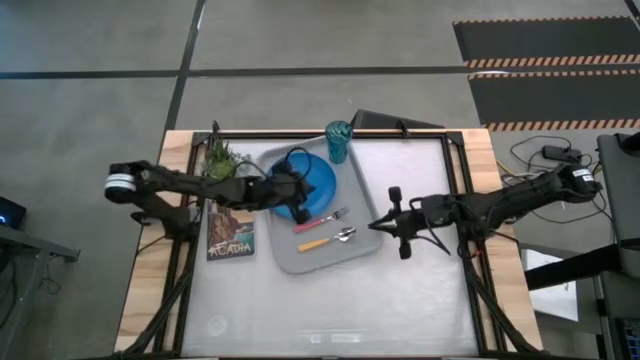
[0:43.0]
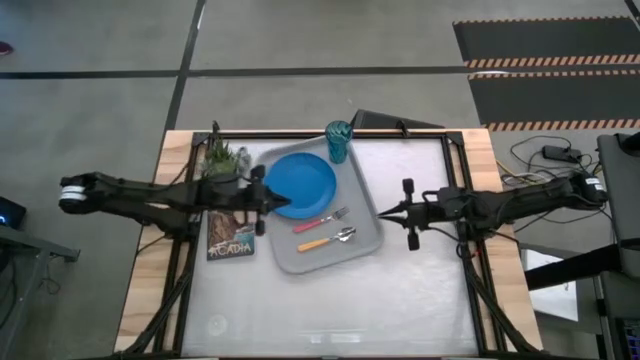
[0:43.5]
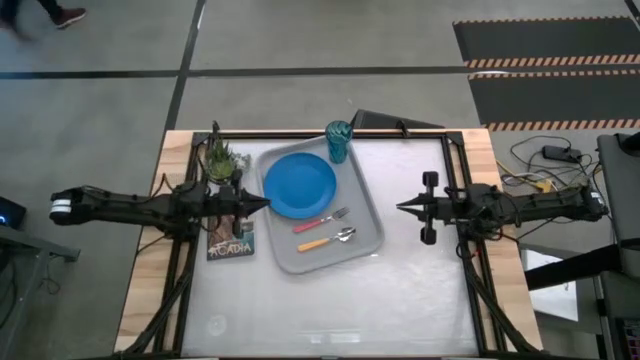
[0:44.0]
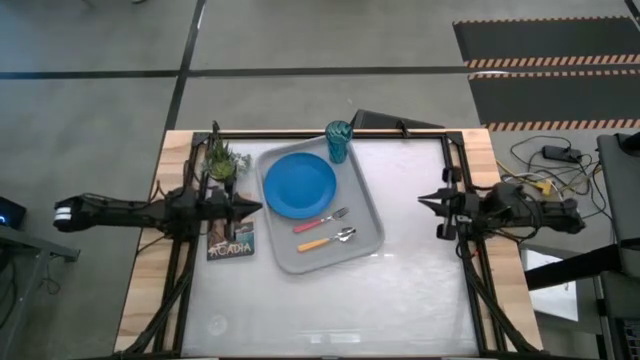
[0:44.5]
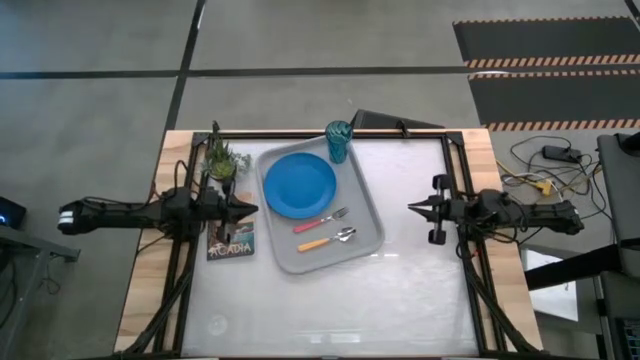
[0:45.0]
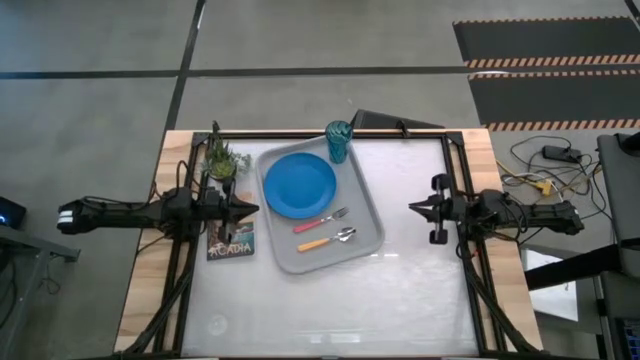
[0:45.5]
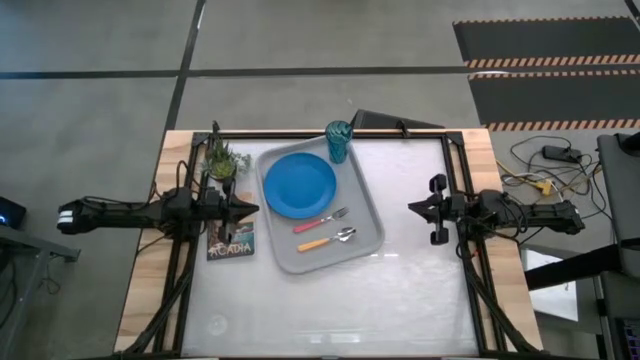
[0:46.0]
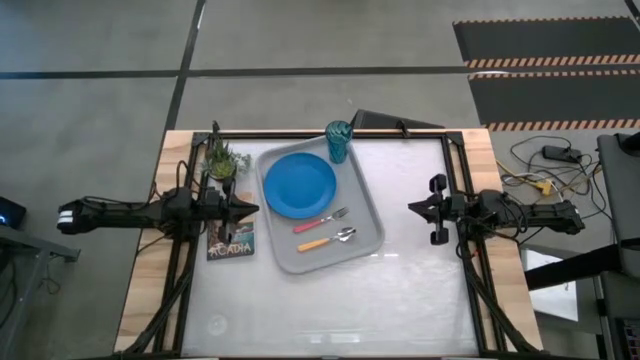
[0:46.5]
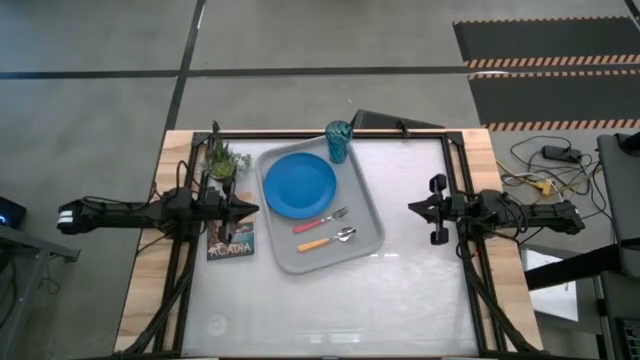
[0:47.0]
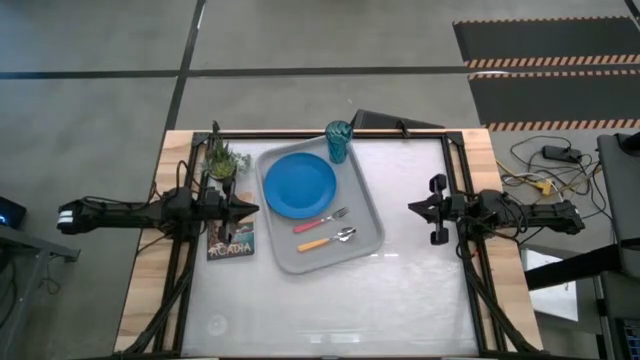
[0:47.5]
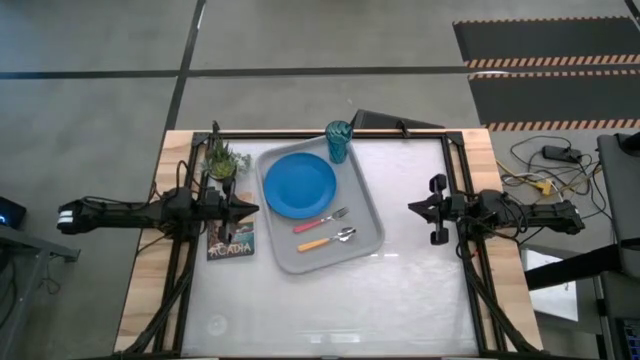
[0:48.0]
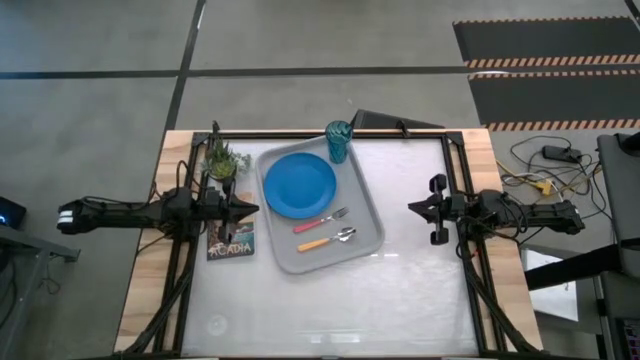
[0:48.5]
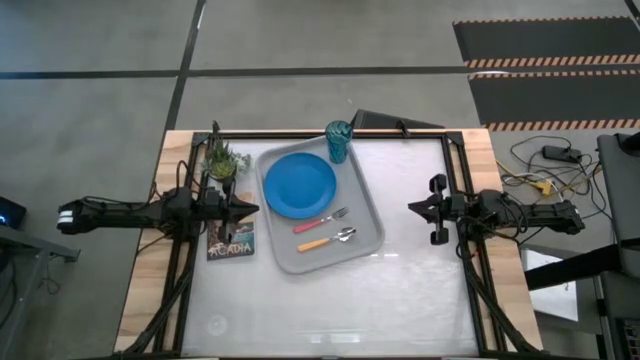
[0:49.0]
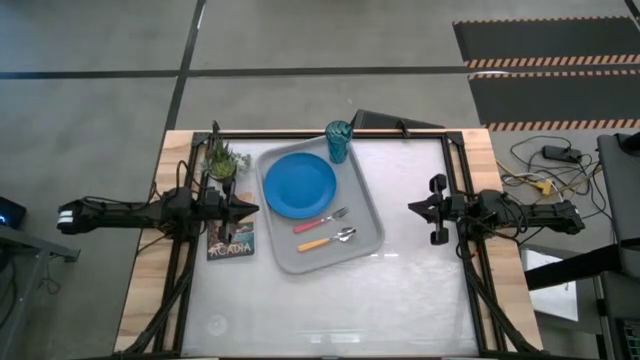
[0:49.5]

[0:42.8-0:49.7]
Task: Pick and place plate/cup/fork/spoon on tray
Return to Home Position

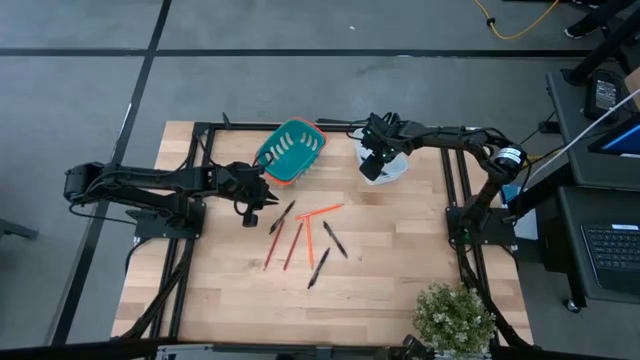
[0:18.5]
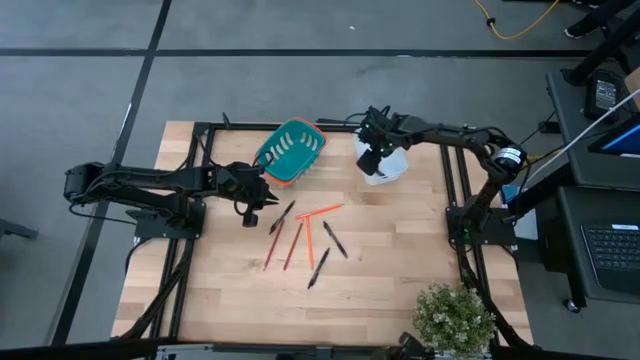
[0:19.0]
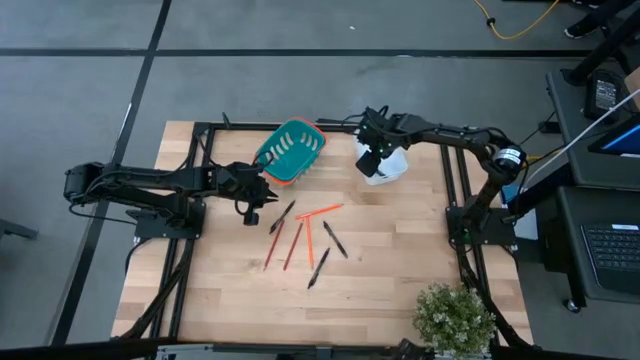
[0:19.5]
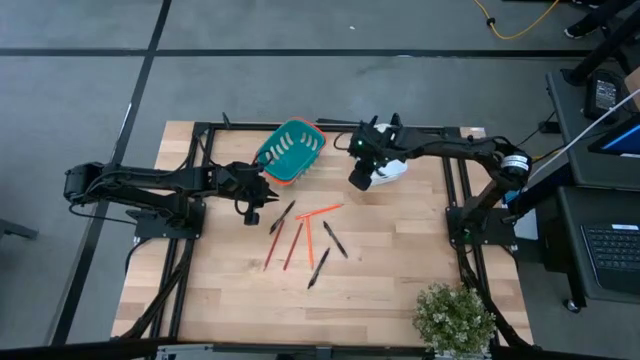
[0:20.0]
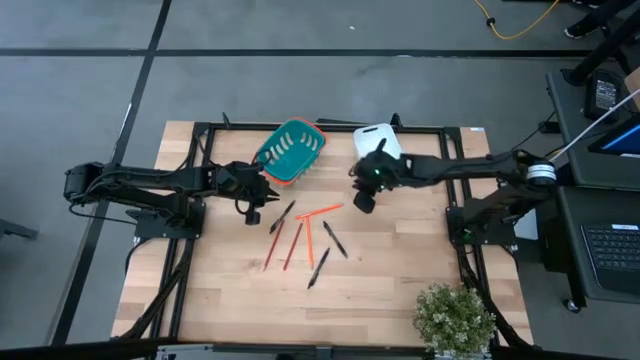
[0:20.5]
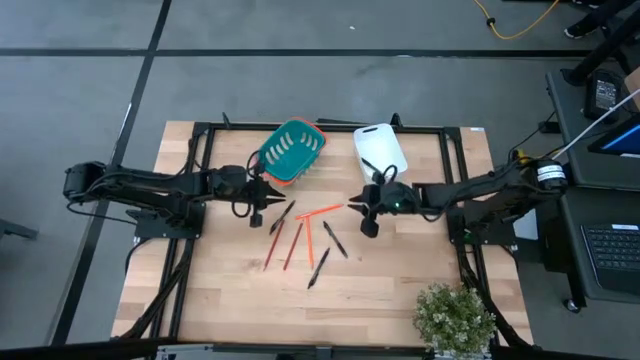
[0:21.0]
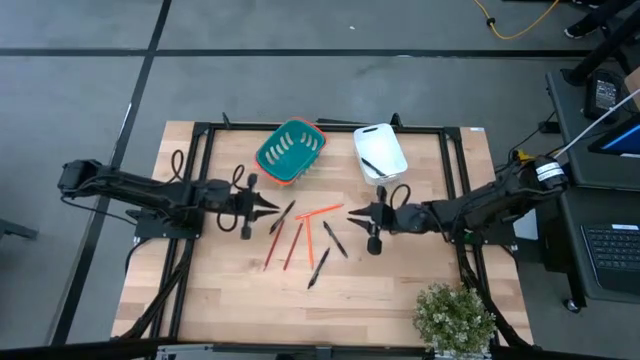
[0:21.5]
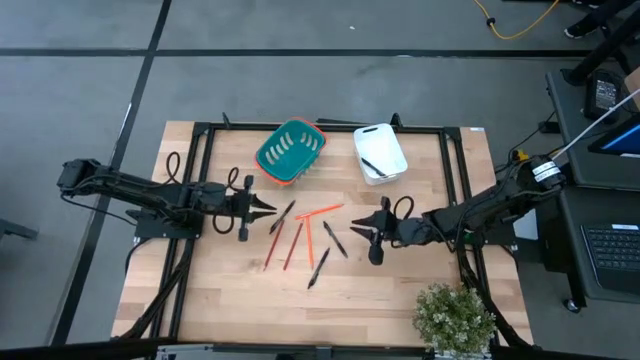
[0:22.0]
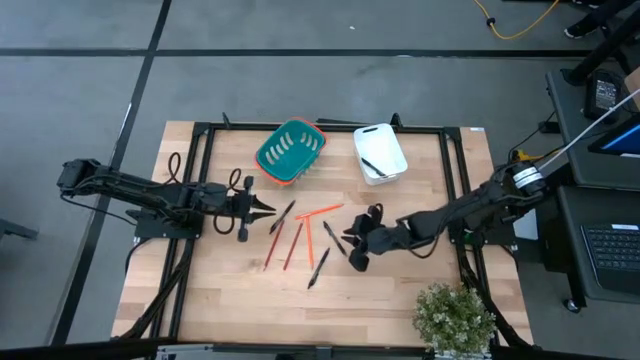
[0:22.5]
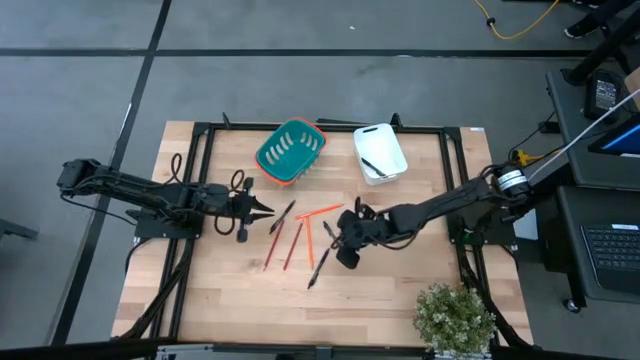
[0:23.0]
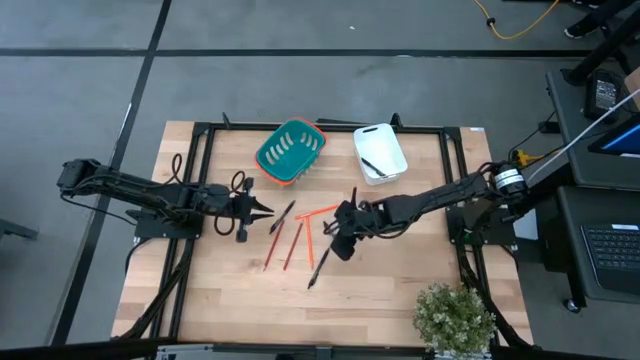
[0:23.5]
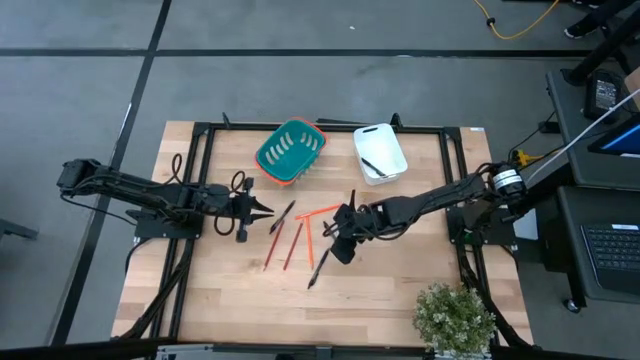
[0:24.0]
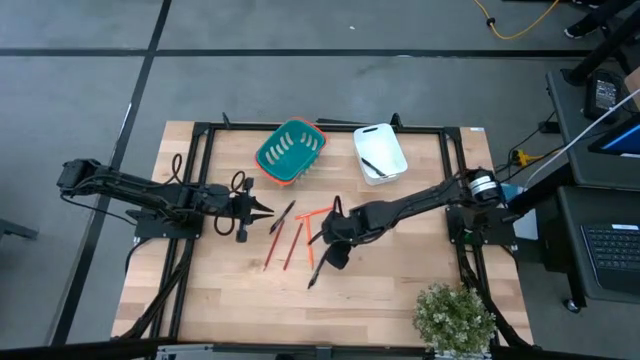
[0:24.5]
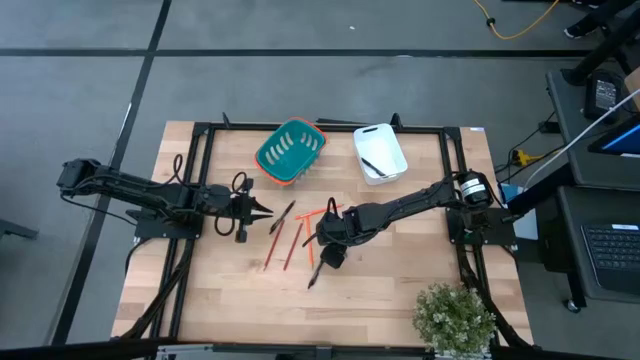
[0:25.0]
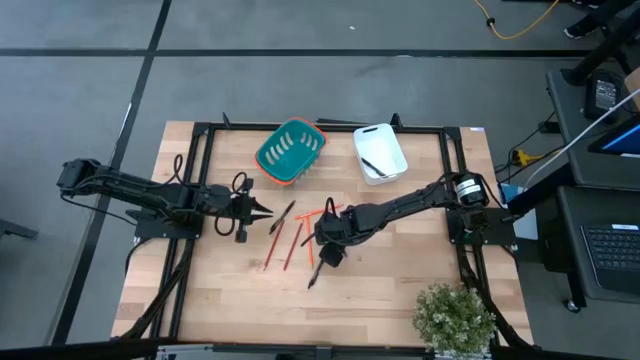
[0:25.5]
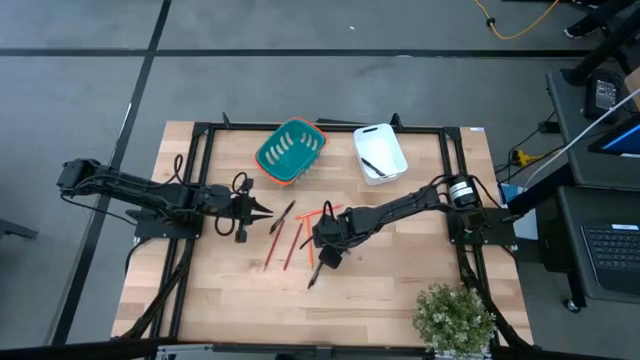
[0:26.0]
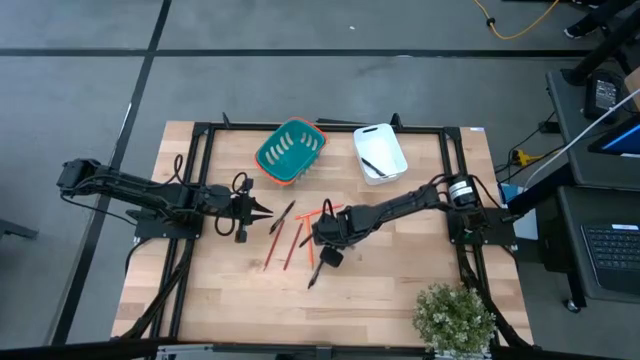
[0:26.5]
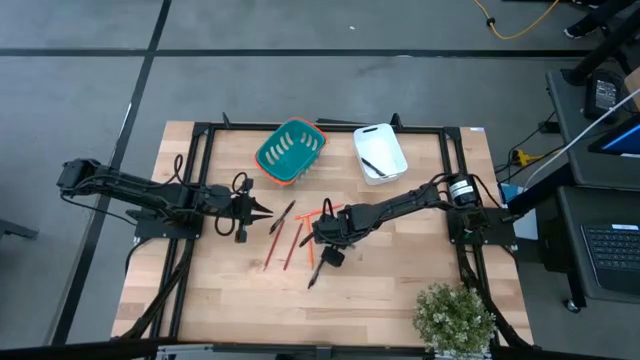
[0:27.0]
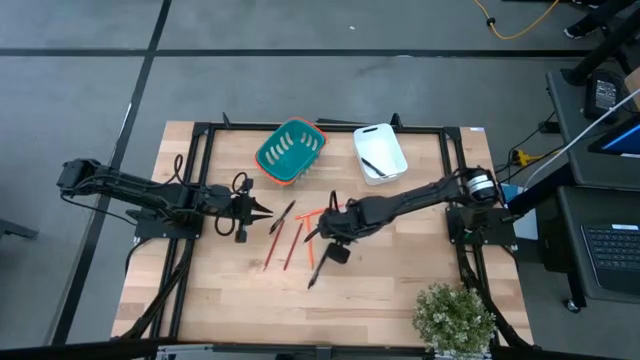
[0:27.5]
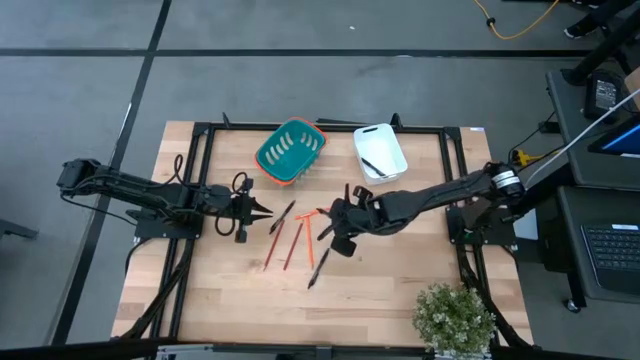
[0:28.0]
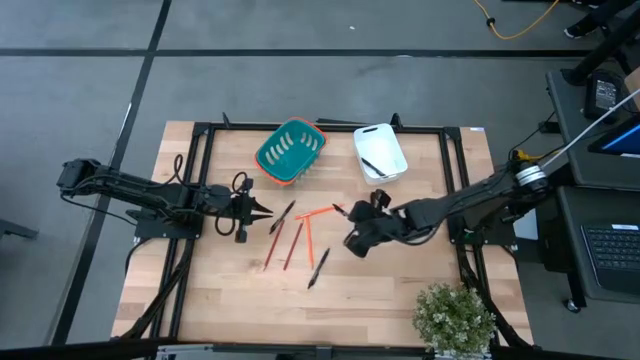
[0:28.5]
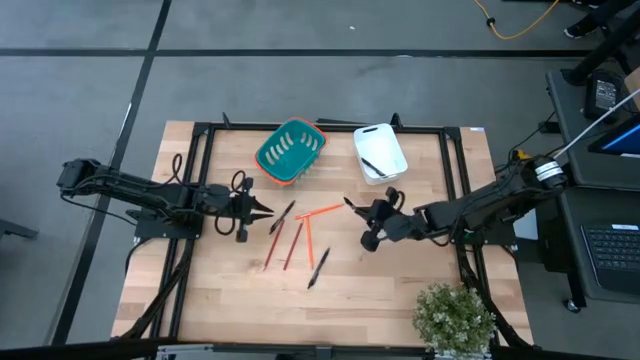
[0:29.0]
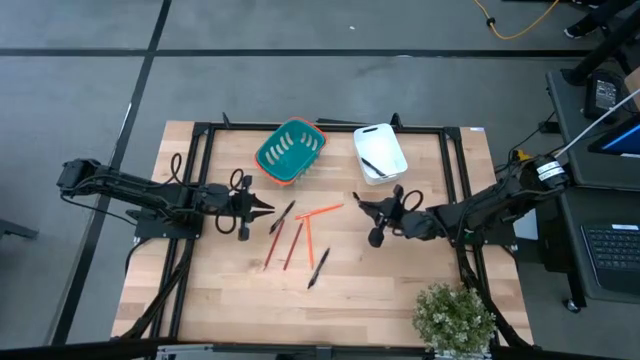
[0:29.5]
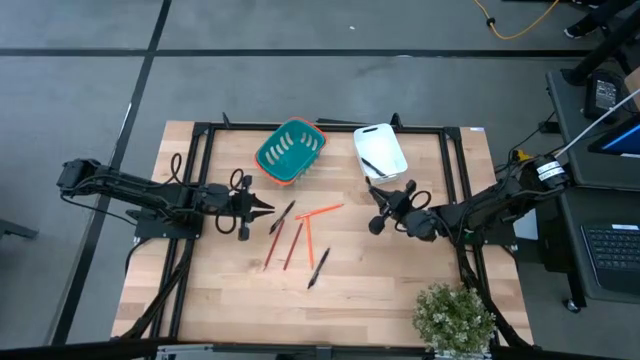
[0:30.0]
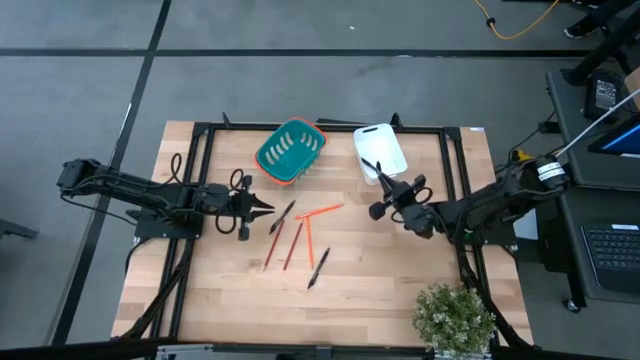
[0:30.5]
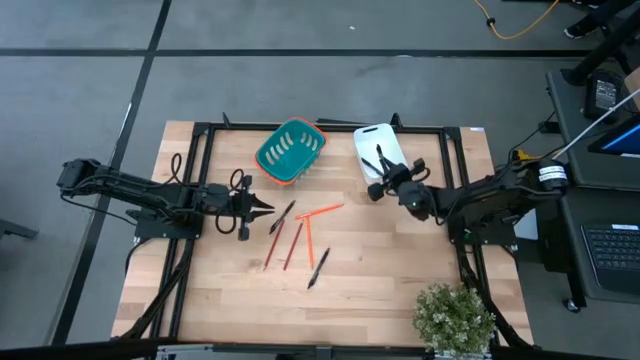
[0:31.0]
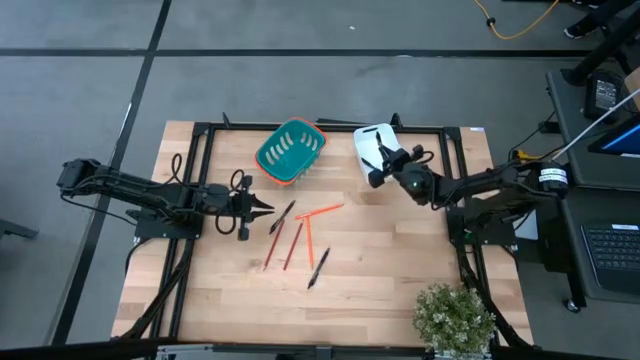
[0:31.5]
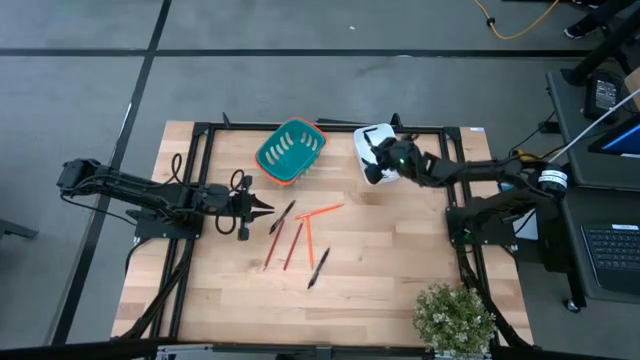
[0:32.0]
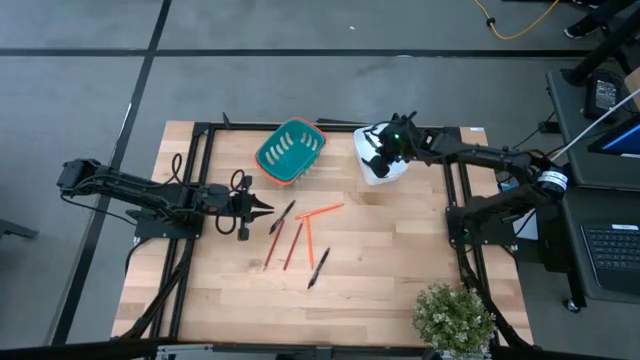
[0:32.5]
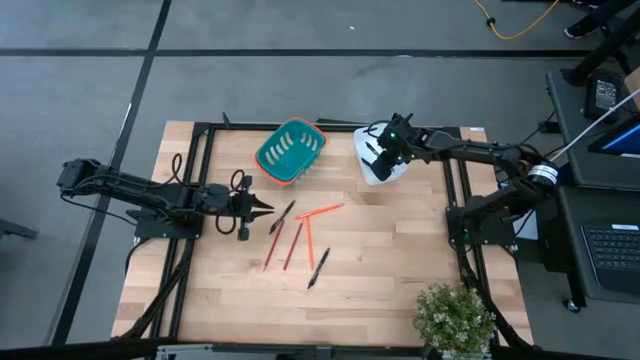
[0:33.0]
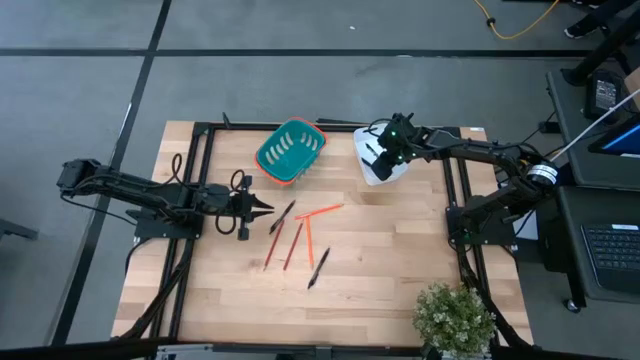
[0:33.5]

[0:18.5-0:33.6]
Task: Sort pens & pencils
Put the black pen into the white bin
